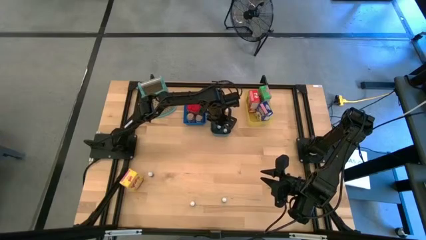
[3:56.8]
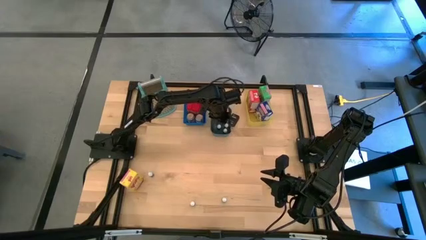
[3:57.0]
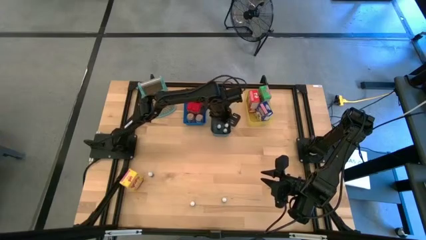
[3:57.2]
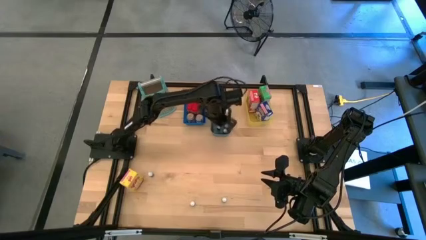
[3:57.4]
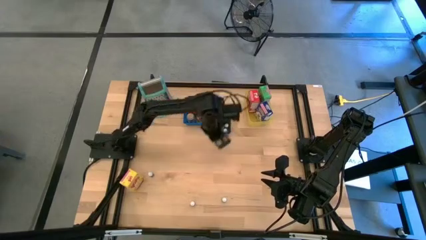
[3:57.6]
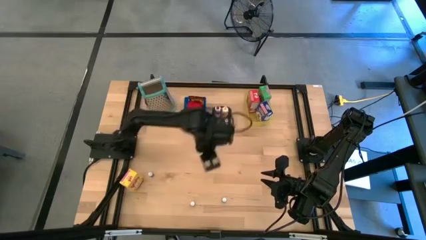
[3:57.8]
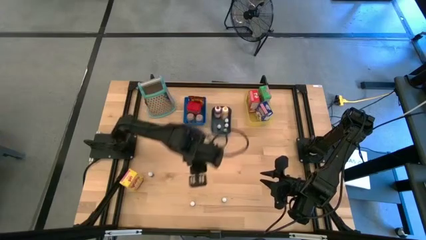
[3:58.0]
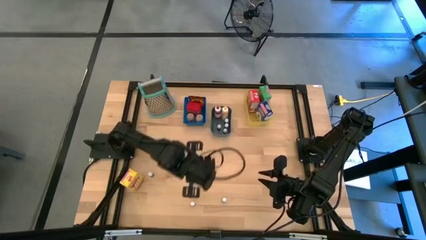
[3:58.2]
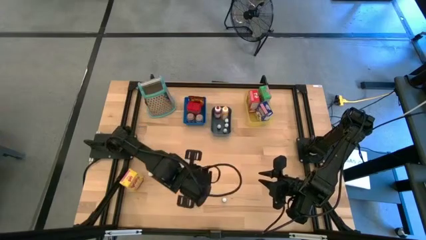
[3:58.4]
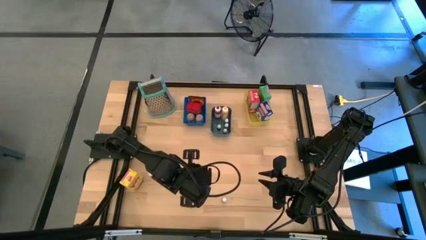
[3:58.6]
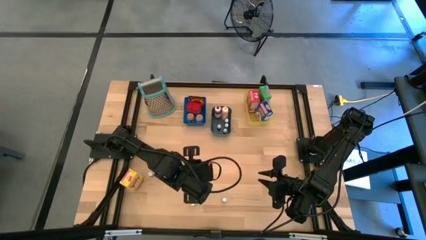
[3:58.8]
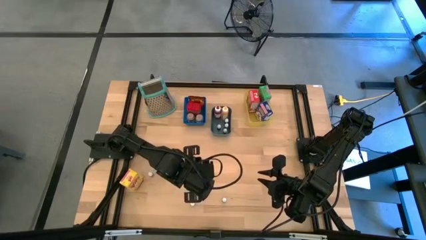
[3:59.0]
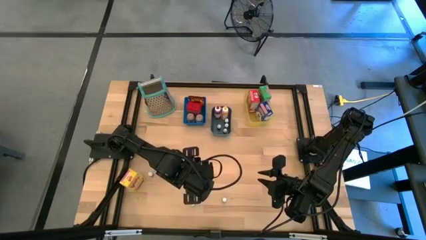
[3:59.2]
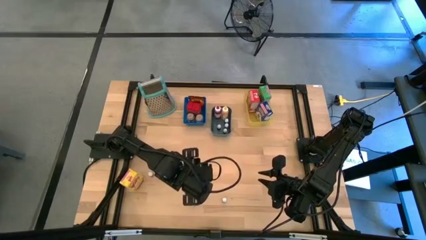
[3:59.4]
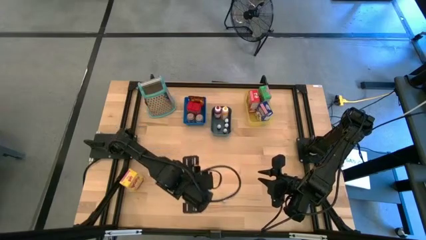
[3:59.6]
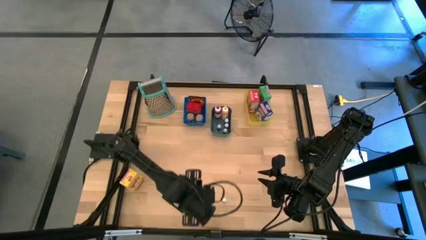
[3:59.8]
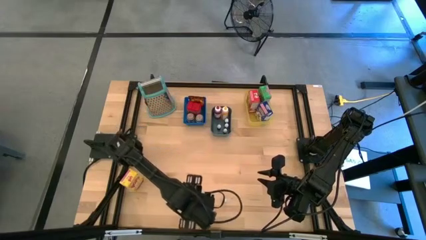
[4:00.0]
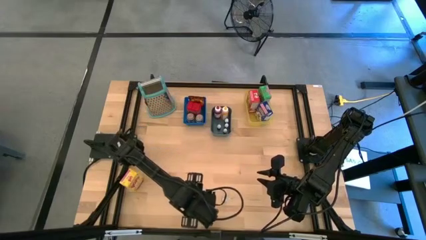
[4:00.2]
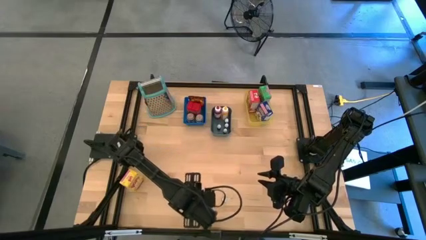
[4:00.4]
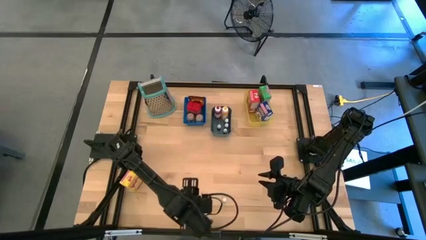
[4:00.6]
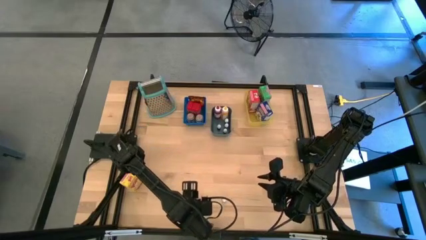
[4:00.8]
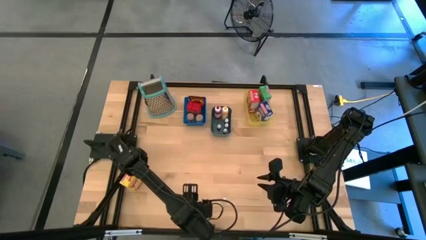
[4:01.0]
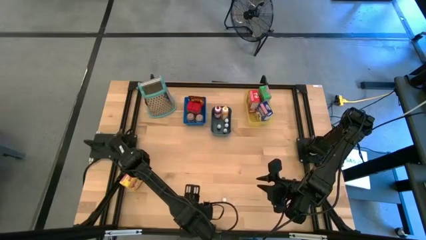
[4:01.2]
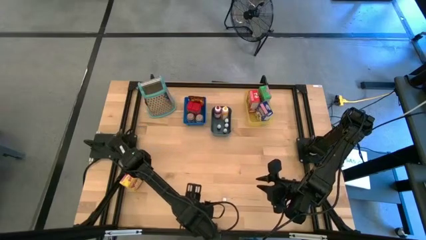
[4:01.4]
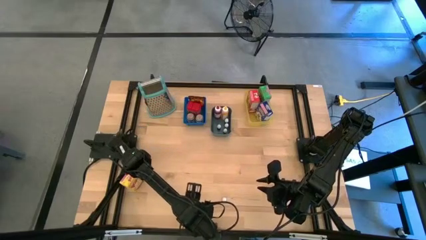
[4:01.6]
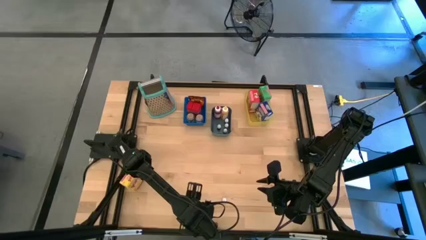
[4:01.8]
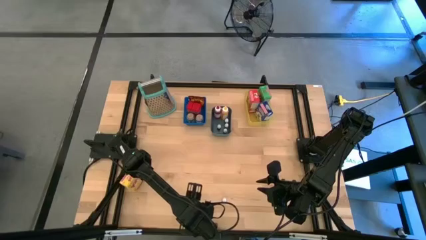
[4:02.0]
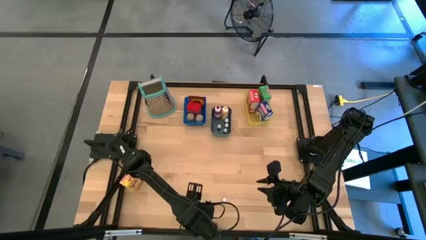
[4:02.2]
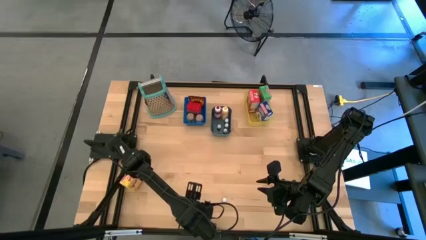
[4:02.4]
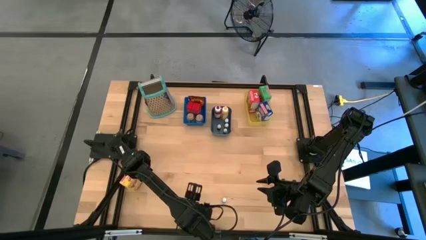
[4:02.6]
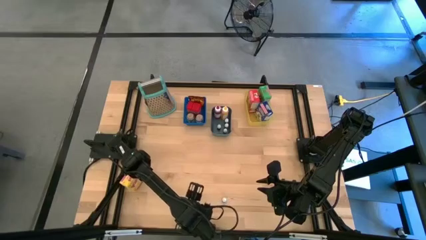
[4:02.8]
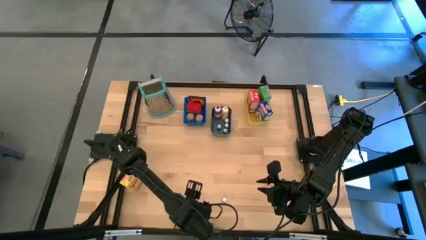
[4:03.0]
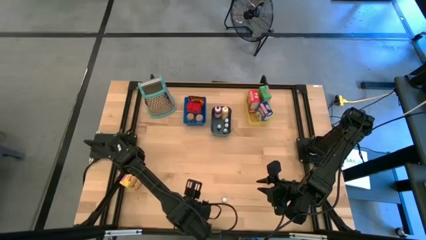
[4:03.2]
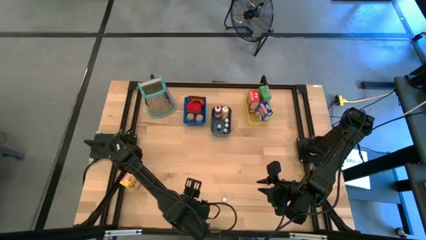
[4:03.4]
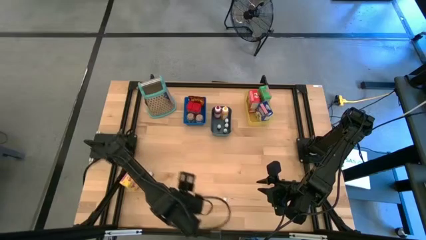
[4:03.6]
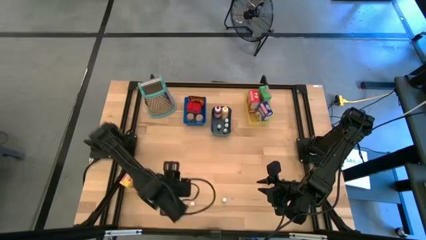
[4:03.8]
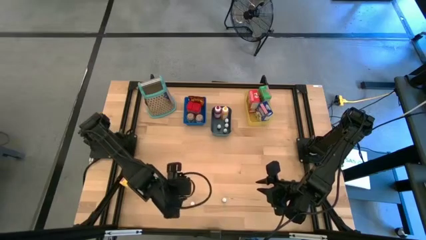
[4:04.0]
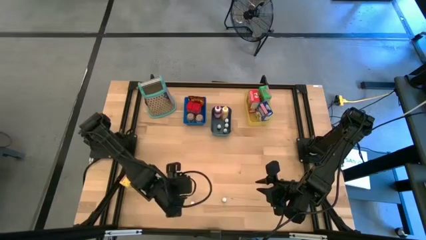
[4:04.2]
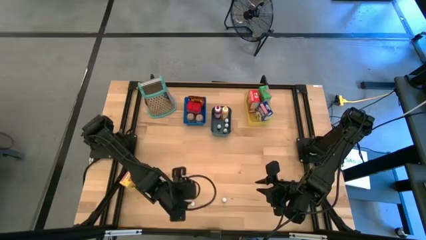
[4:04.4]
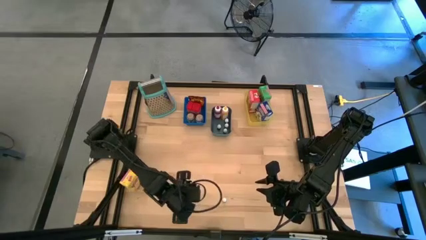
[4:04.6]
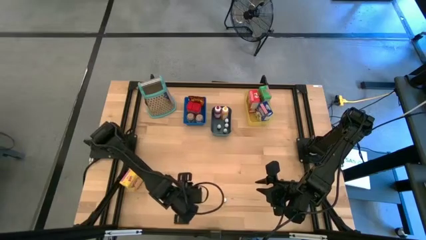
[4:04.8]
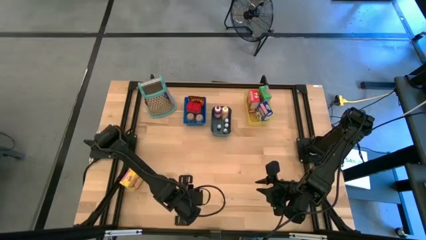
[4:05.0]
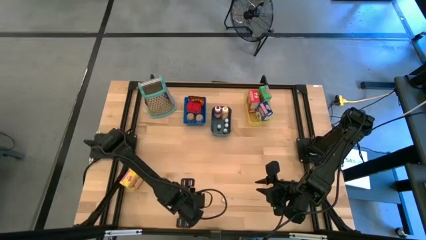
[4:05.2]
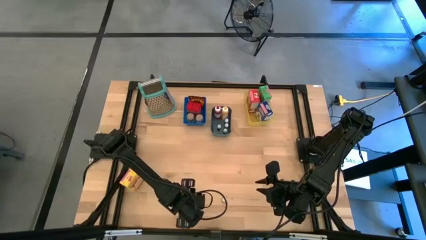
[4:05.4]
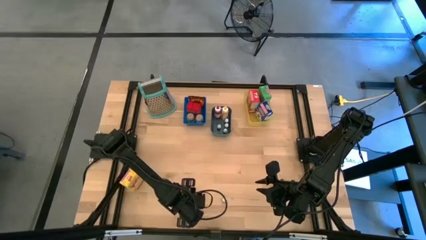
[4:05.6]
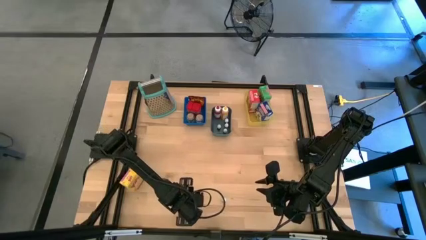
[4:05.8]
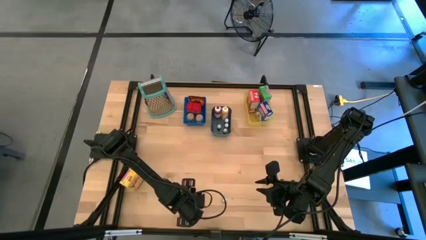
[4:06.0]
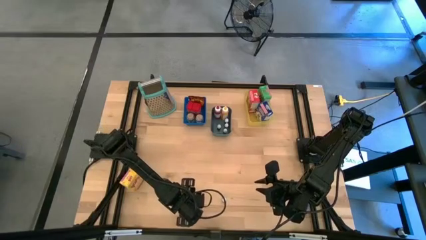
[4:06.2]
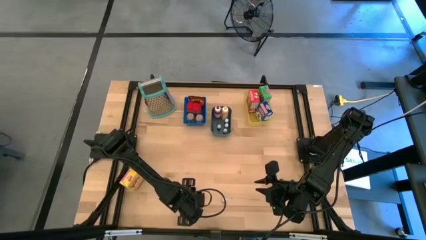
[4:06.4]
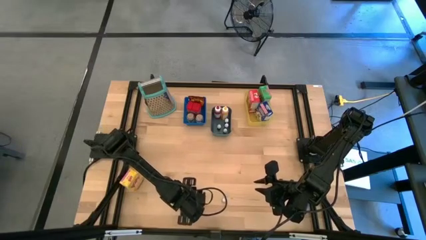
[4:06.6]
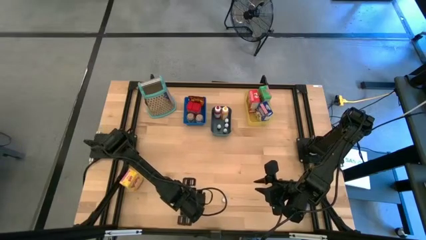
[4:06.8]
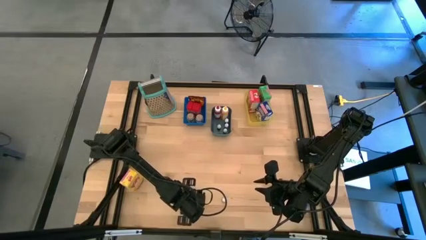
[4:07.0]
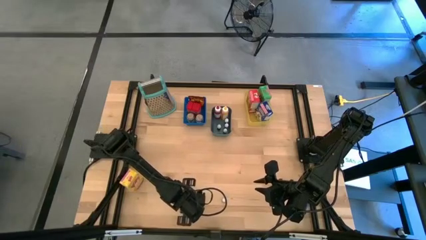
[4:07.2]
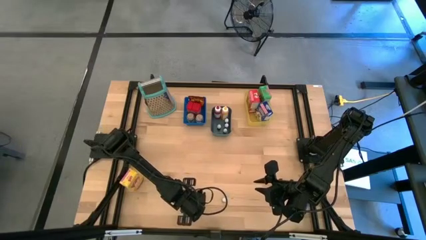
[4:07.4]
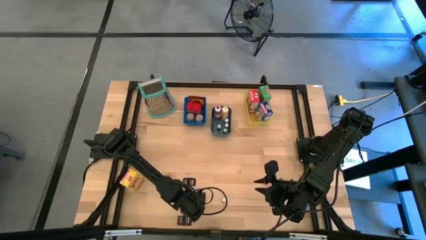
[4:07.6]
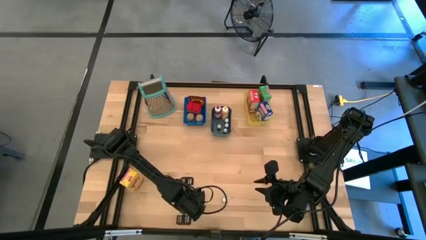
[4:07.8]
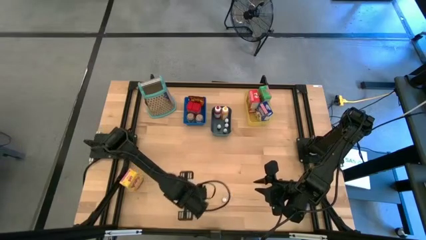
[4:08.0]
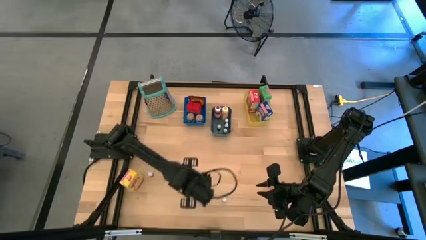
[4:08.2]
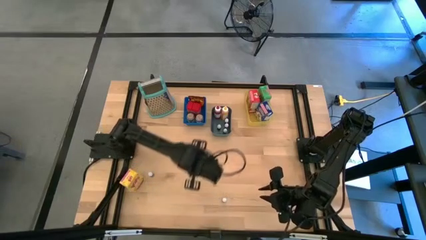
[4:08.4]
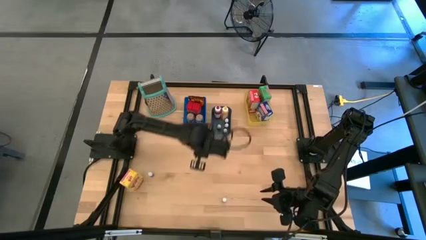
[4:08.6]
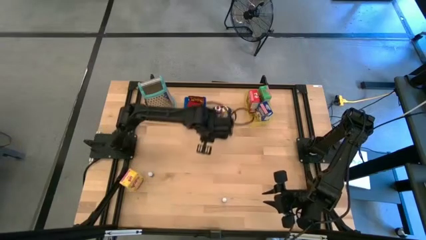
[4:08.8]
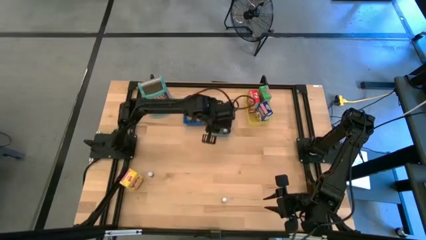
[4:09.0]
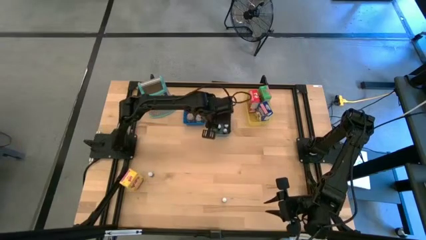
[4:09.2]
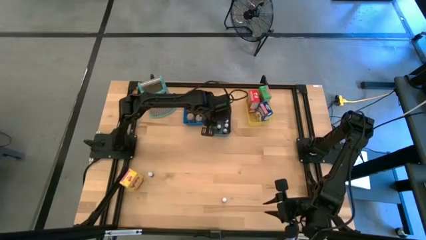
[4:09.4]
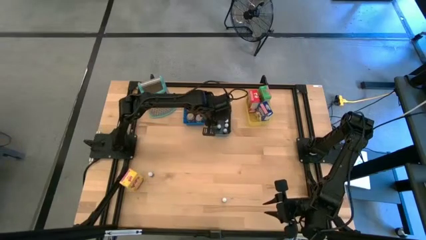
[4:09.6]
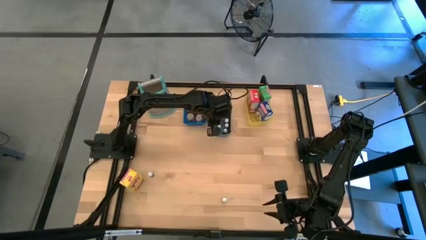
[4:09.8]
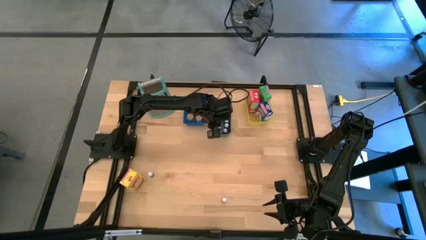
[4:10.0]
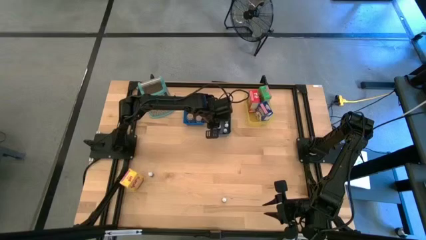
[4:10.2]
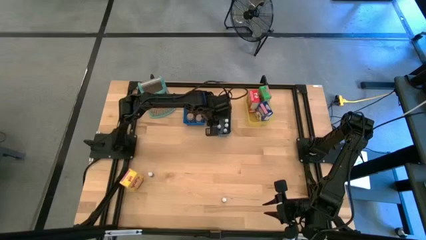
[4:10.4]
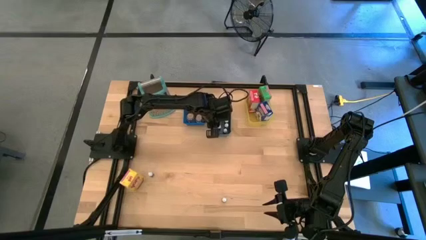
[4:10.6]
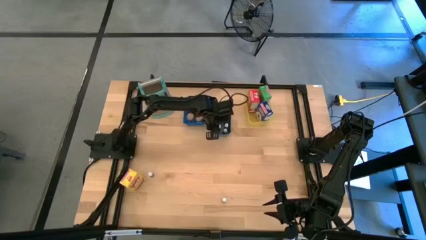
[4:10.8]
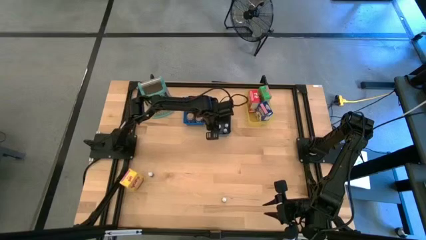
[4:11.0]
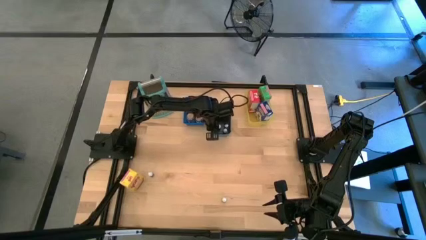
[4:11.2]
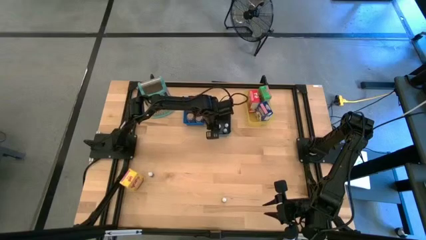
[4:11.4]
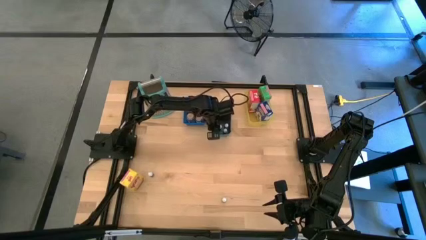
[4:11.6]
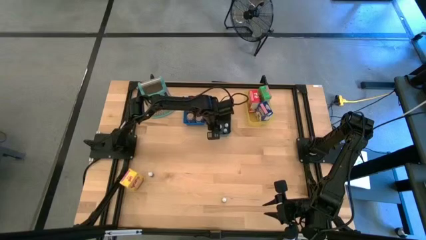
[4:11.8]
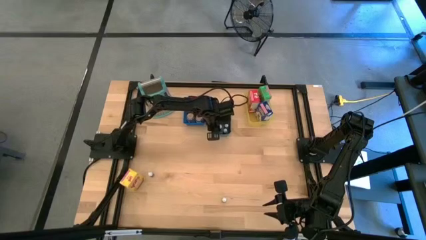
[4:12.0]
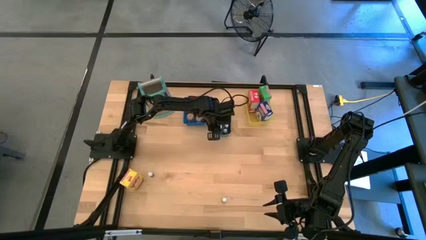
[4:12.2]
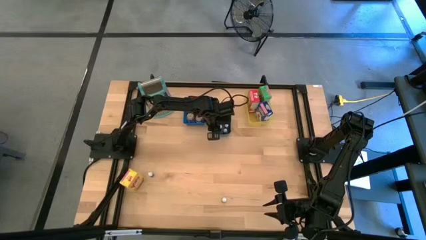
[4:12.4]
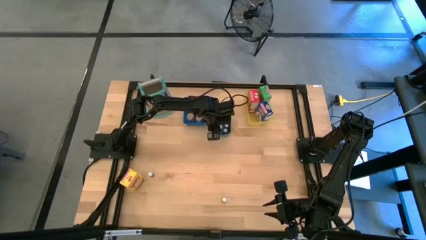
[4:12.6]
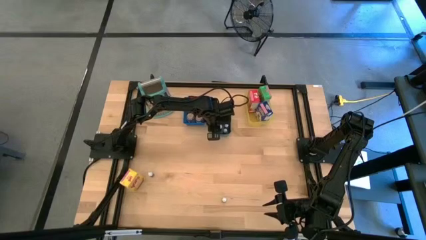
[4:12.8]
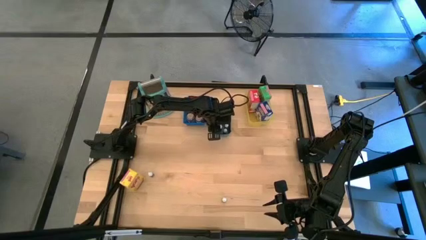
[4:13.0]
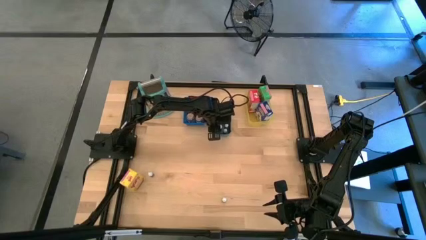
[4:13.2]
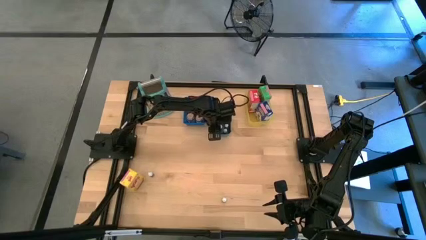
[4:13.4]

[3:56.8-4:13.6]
Task: Pick & Place Kitchen Items
Put the small black food coloring bottle into the dark green bin

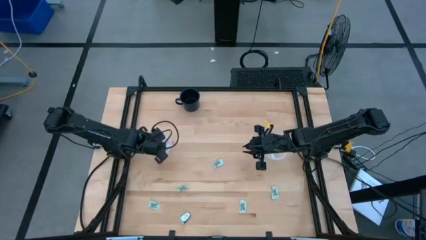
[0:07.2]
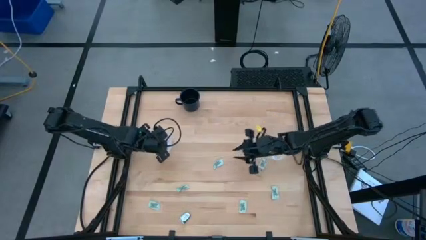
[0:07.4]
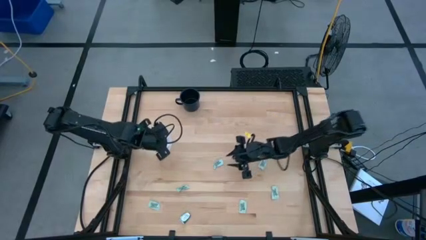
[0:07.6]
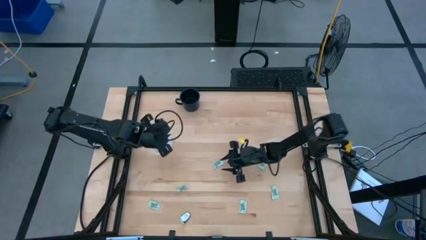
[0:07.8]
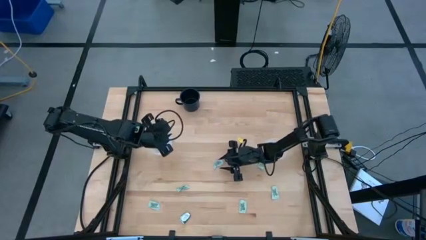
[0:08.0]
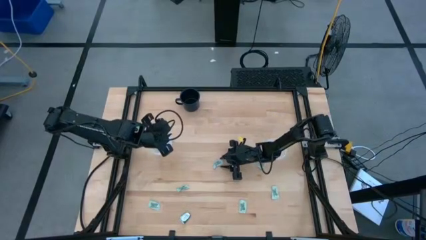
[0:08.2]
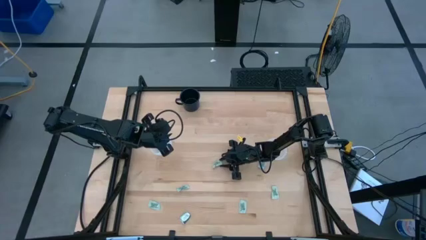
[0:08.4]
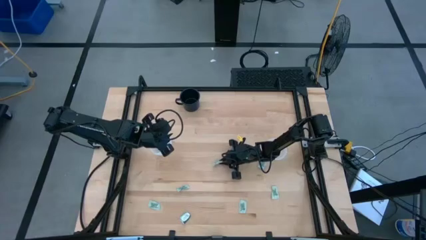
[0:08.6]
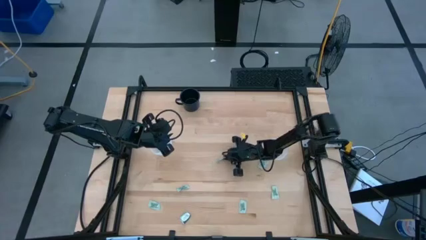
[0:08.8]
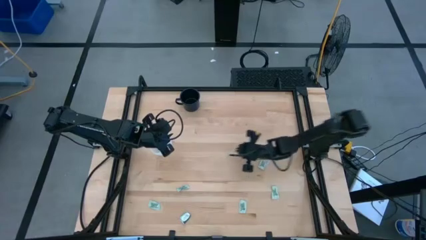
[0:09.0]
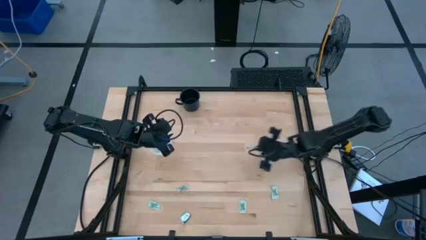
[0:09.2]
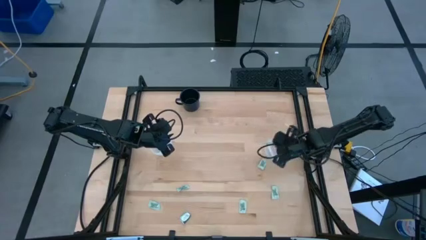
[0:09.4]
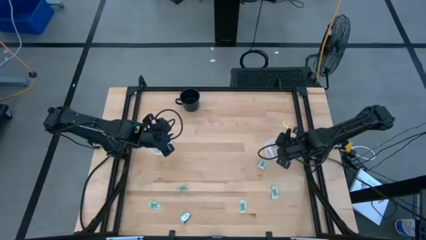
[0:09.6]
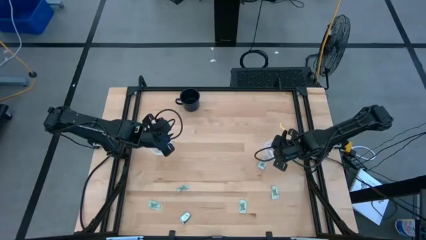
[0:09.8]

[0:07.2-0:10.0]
Task: Pick and place Stevia / Truvia into bins
Put the stevia packet into the right container
